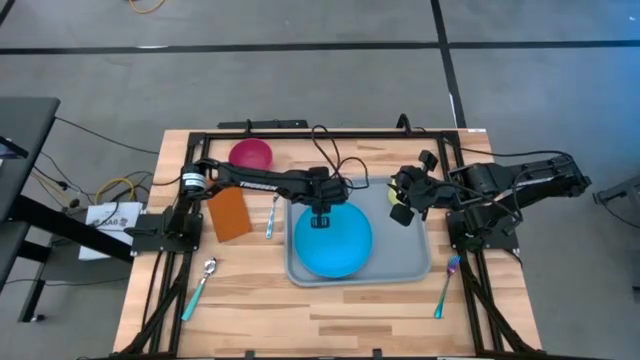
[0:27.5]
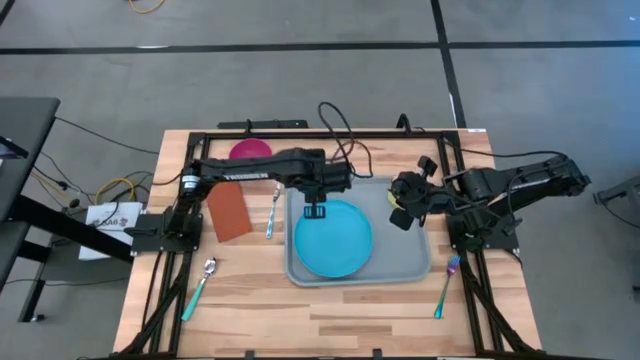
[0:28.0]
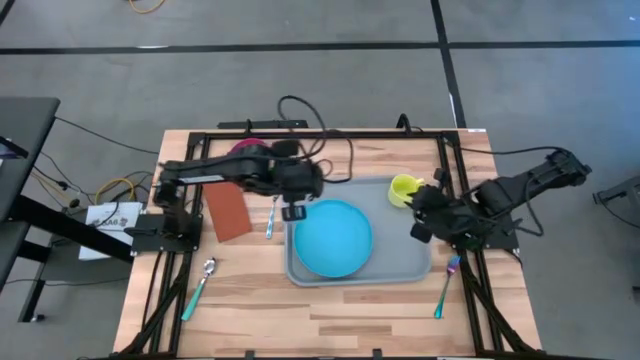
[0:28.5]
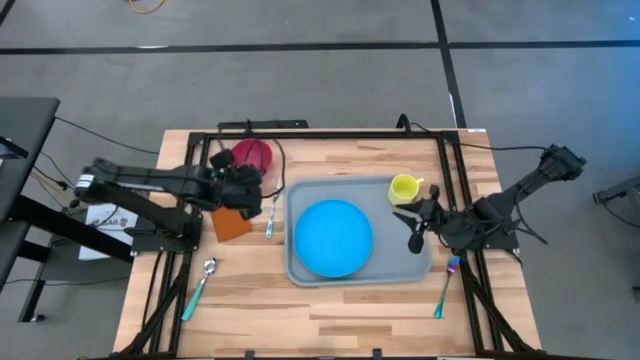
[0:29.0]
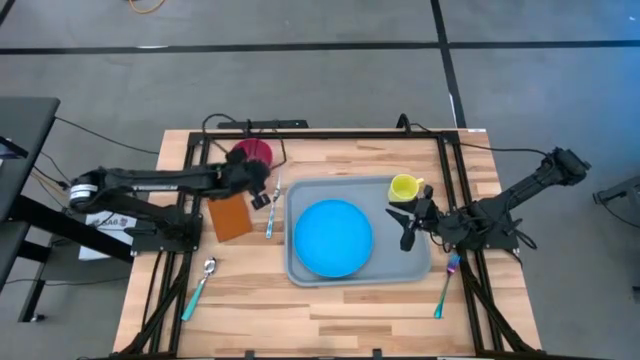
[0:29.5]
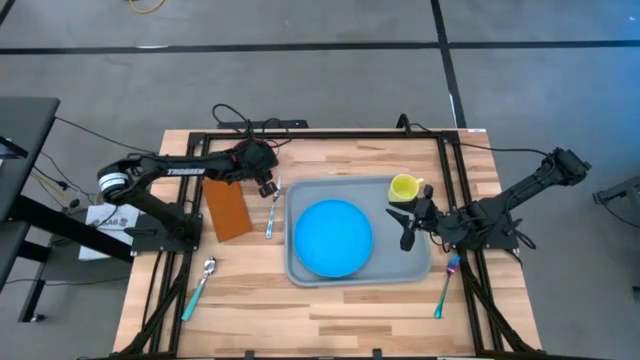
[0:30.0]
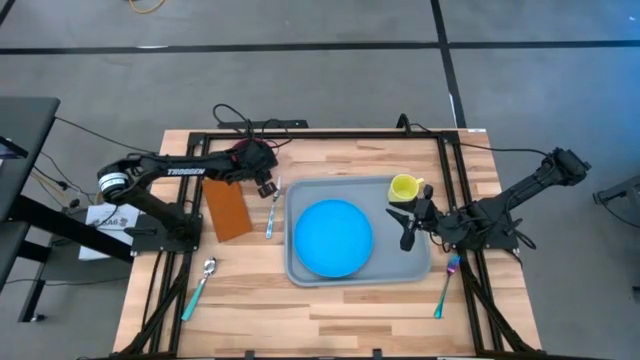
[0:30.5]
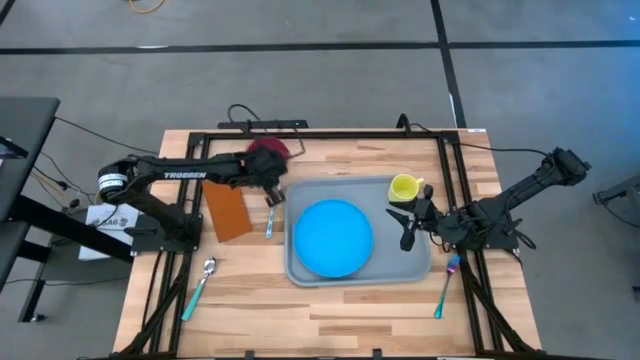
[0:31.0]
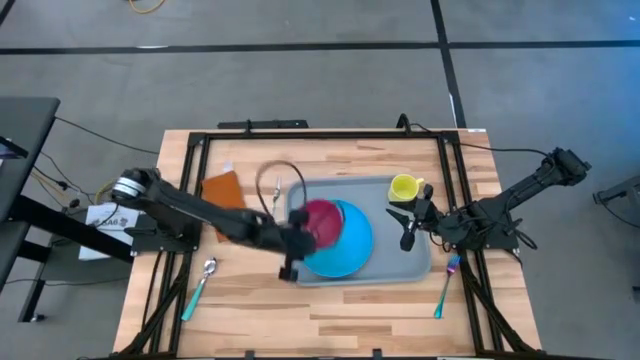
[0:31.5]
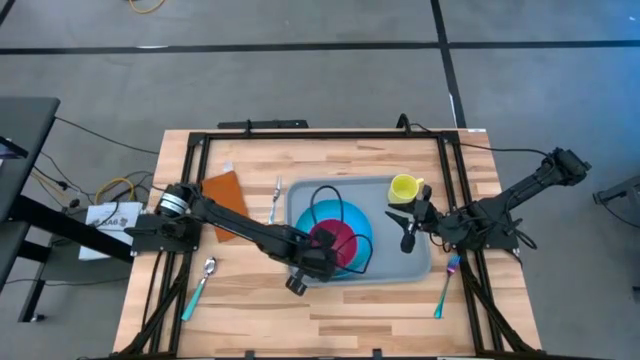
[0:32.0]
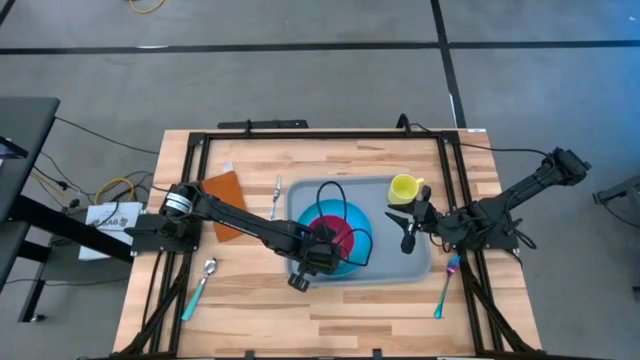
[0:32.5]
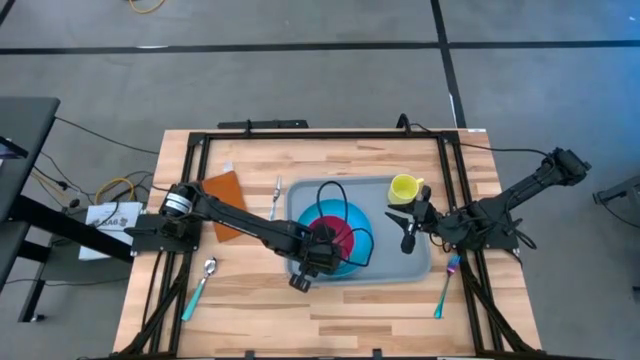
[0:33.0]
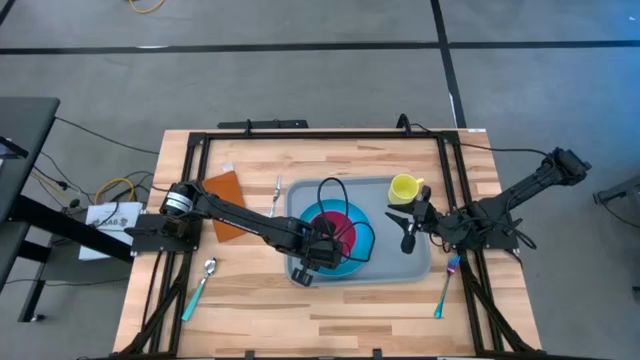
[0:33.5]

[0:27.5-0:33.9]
Task: Set up tray
Put the red bowl on the blue plate

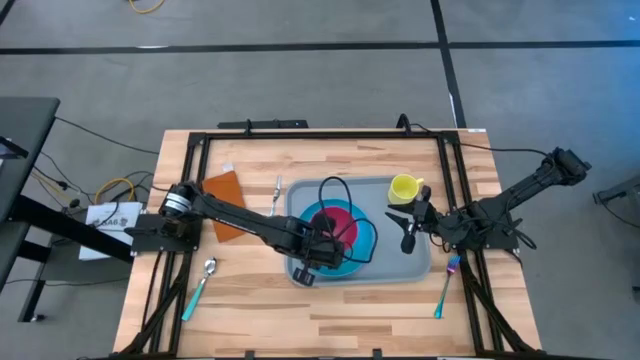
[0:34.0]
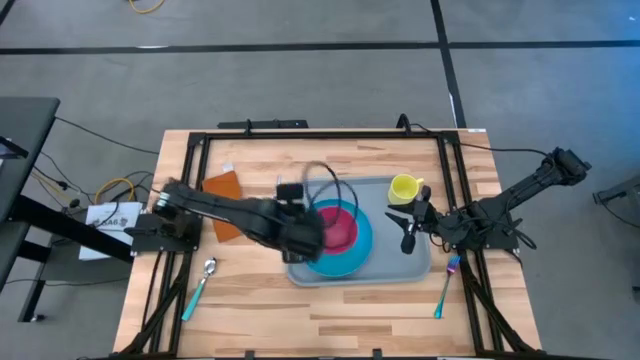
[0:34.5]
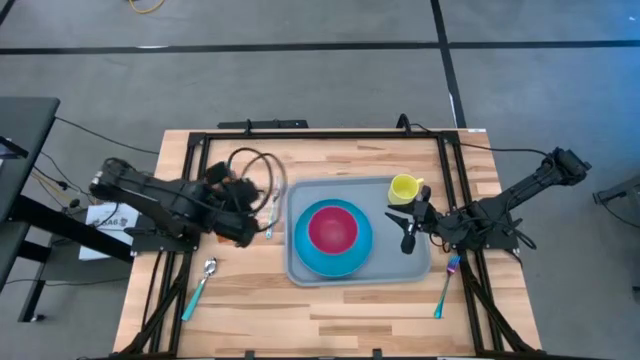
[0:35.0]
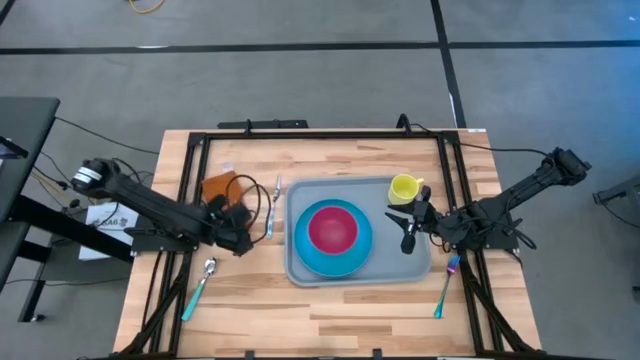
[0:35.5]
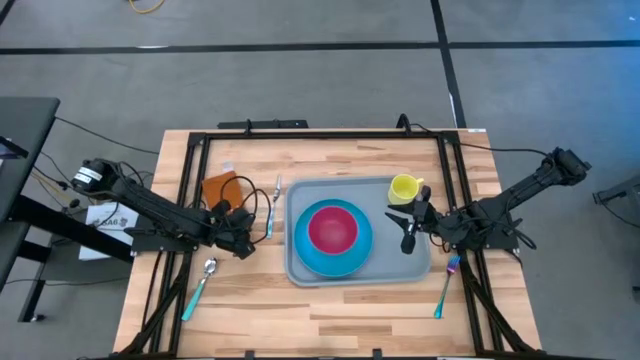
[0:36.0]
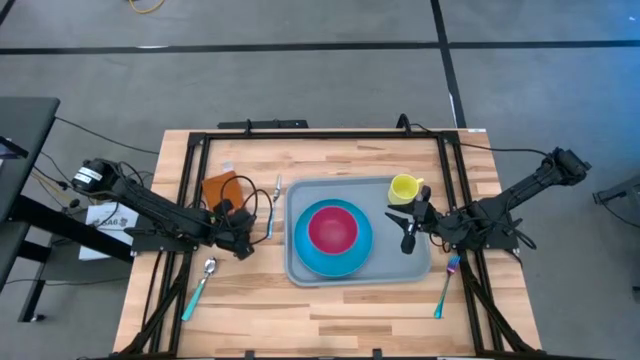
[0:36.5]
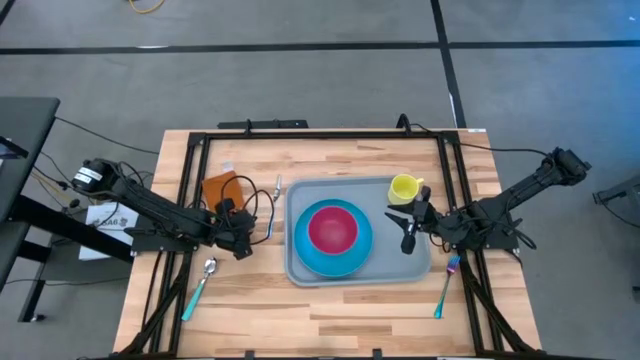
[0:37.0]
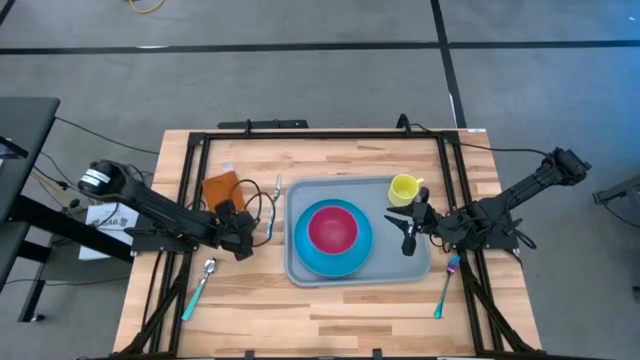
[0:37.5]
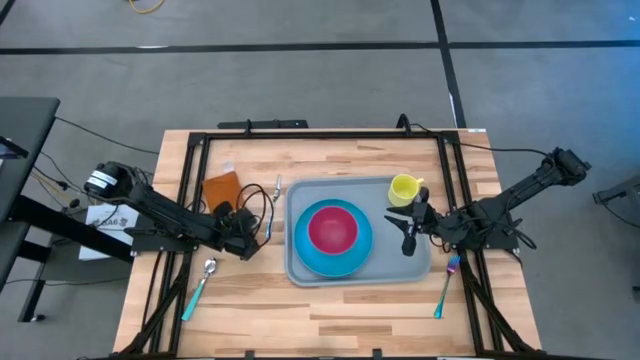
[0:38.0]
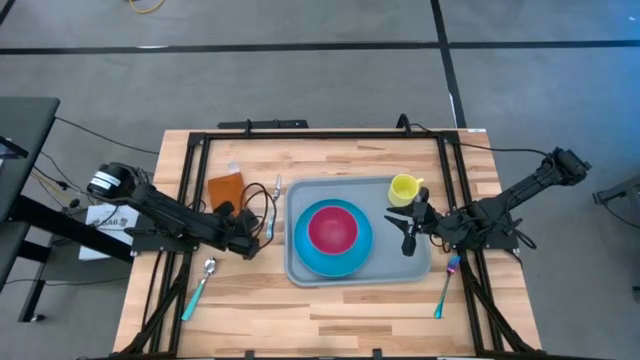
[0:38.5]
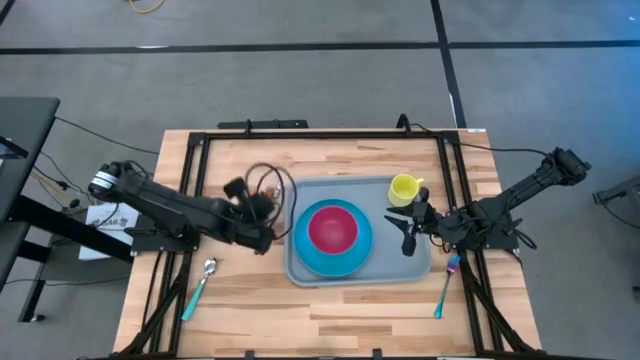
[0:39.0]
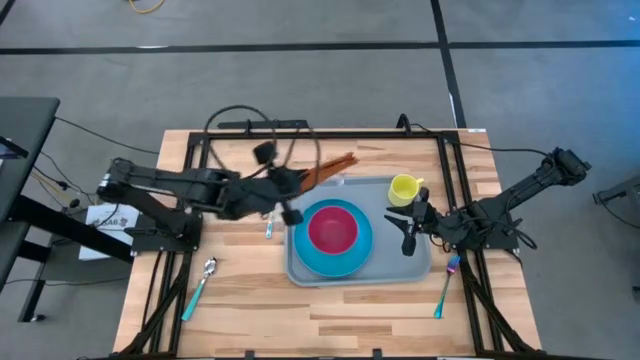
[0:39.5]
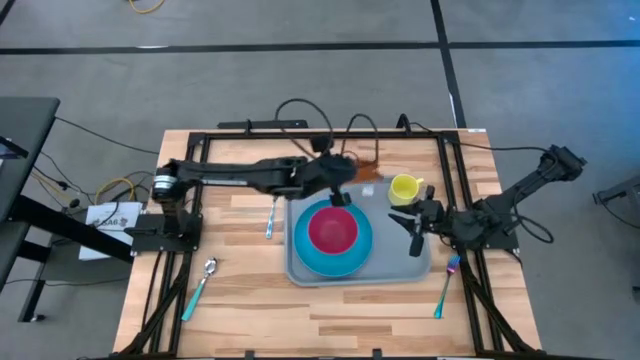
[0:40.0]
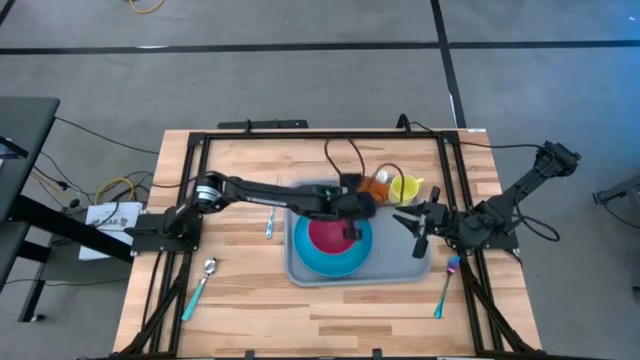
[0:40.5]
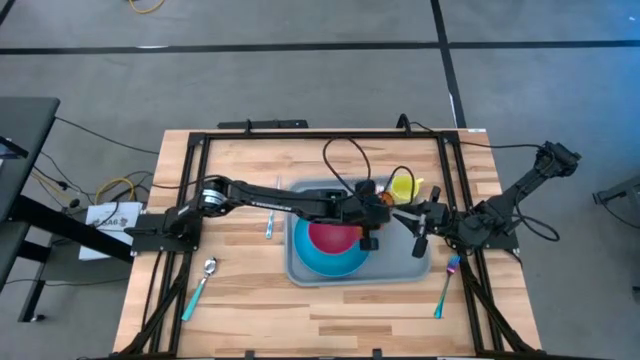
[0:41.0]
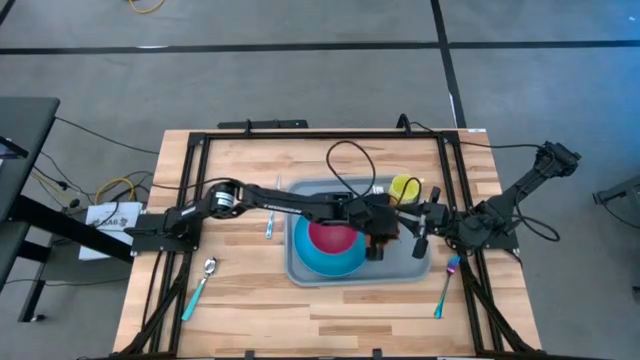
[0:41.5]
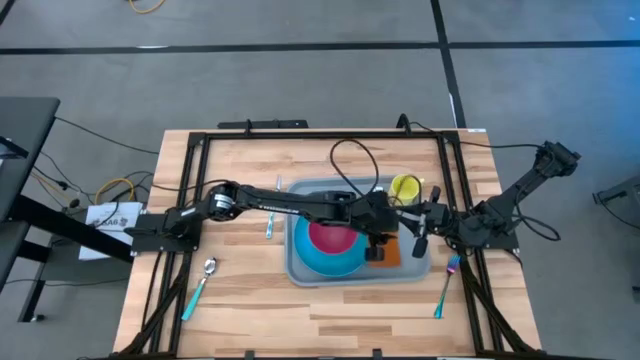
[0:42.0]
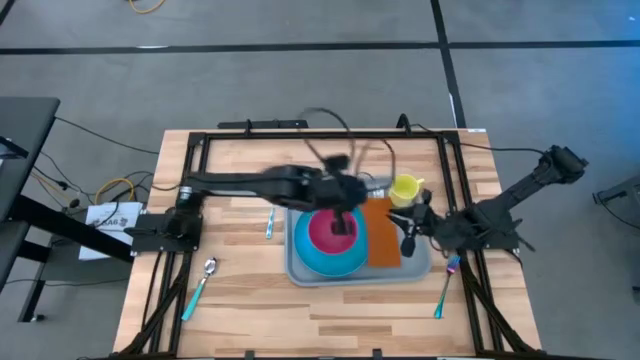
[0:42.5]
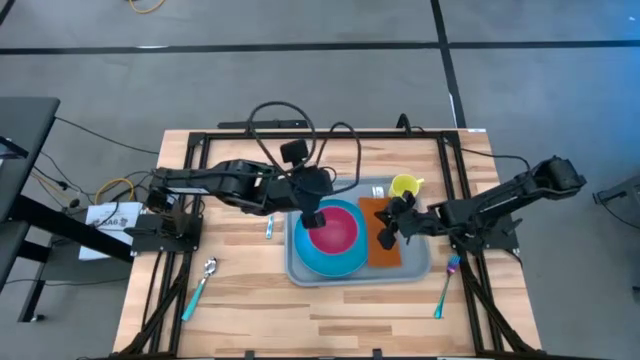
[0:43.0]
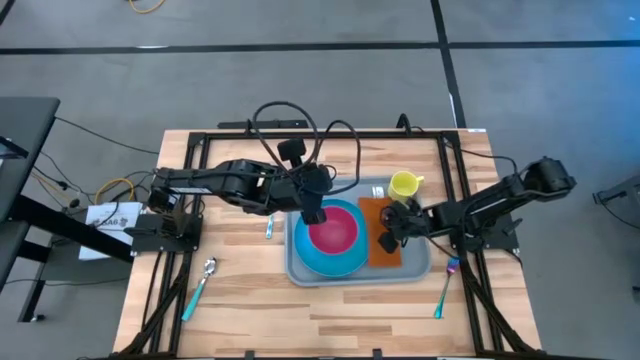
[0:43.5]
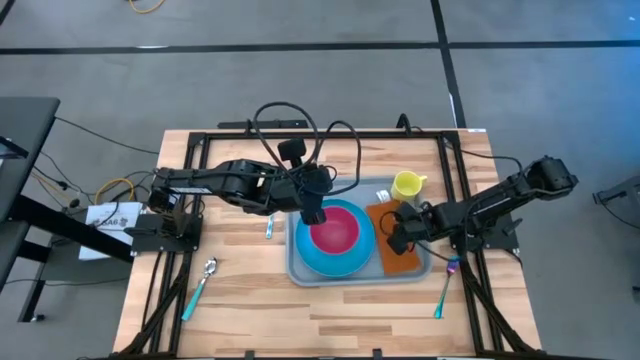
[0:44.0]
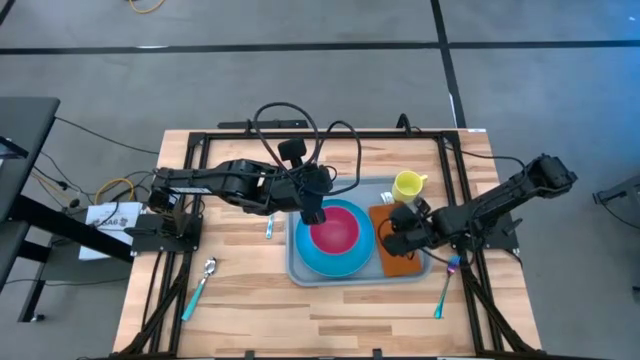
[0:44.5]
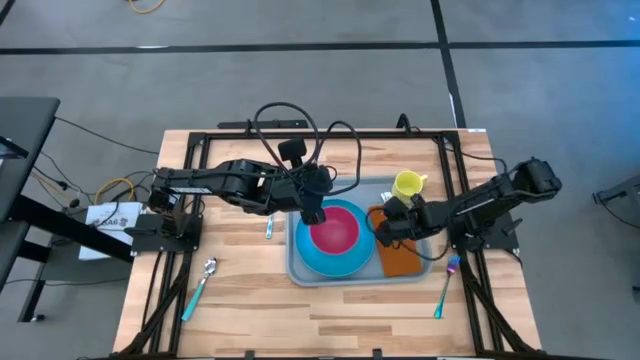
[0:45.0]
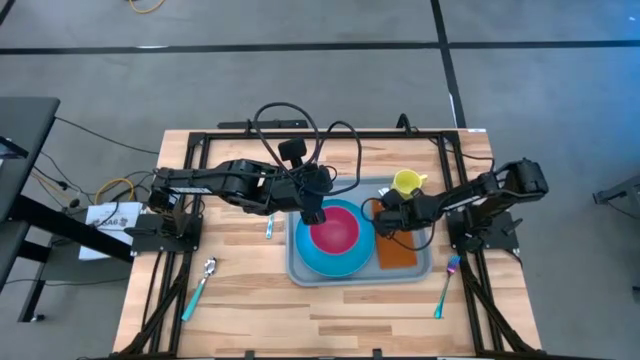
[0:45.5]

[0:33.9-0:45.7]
Put the brown napkin on the gray tray to the right of the blue plate

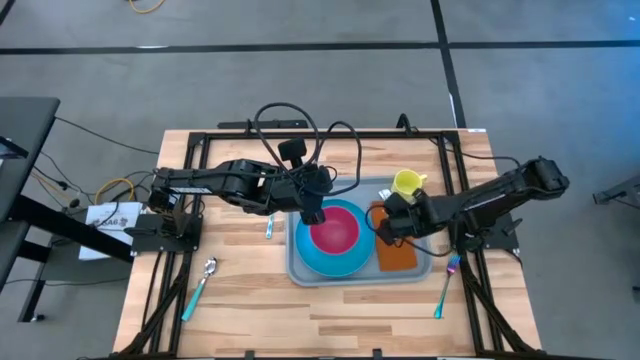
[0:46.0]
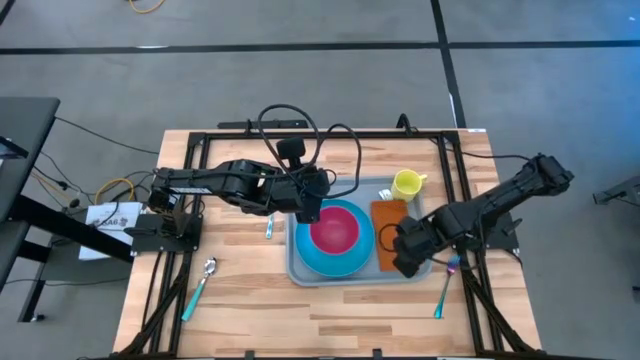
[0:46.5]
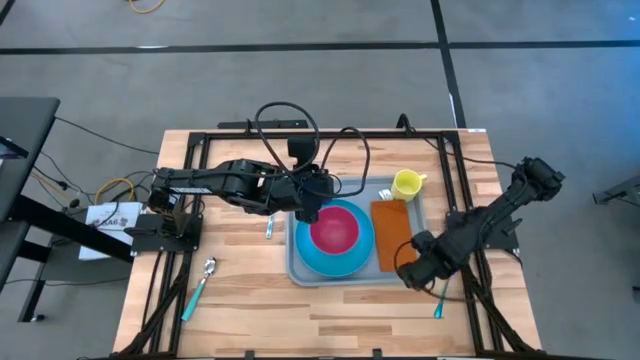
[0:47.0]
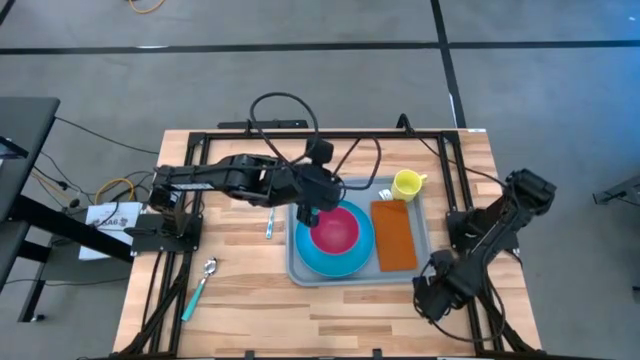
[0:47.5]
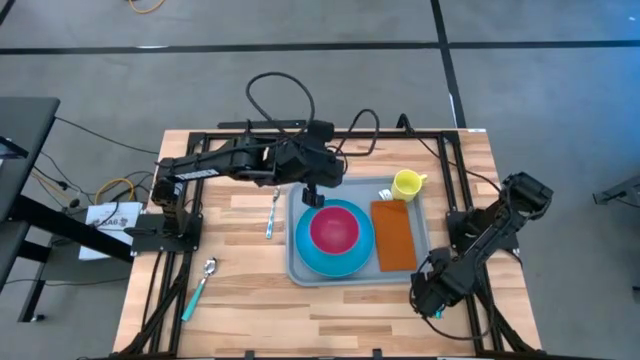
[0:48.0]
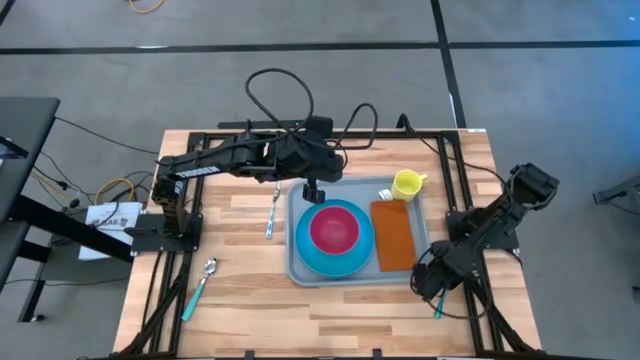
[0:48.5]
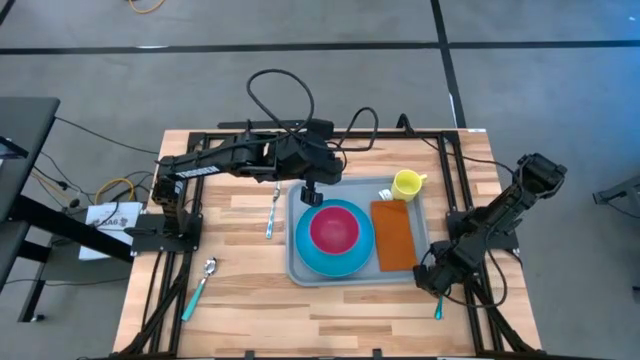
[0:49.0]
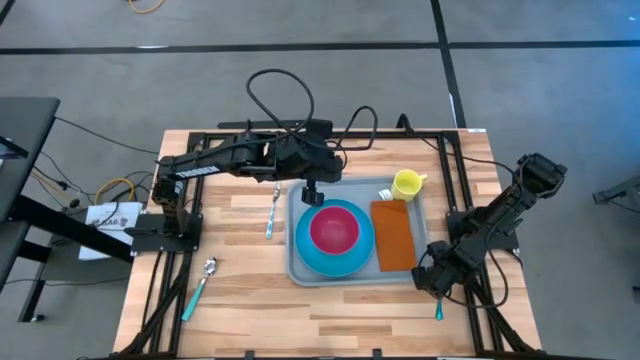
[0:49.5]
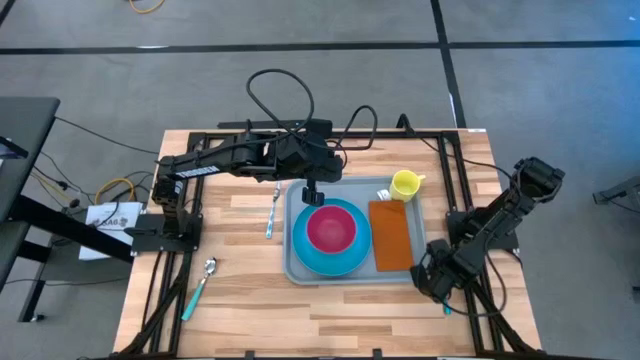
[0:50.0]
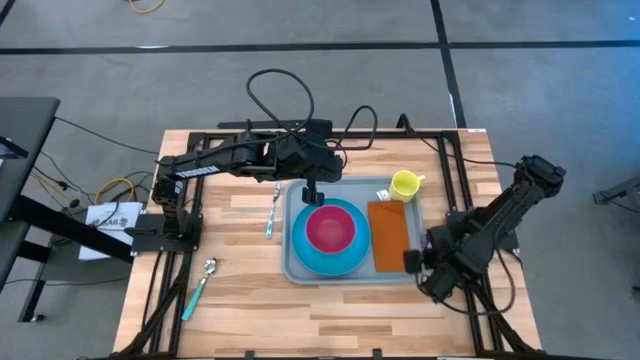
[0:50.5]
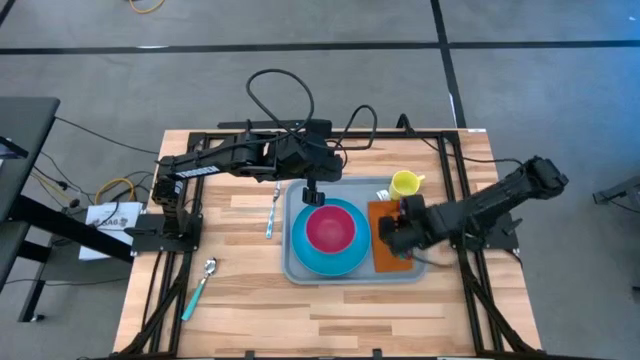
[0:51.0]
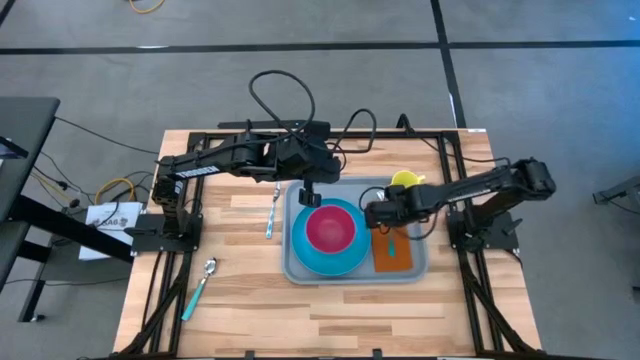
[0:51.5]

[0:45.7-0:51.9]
Put the purple fork on the brown napkin
